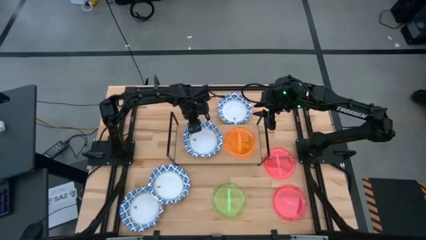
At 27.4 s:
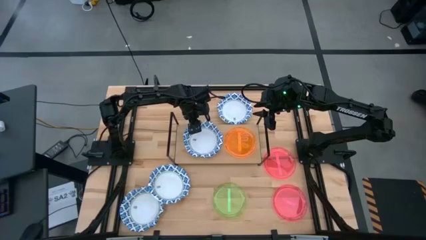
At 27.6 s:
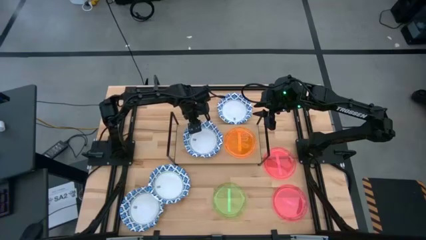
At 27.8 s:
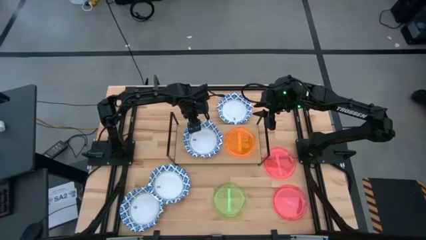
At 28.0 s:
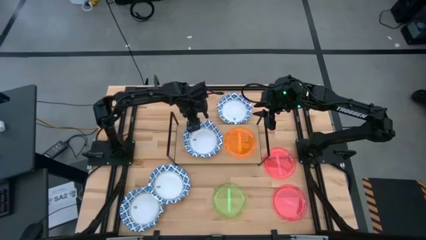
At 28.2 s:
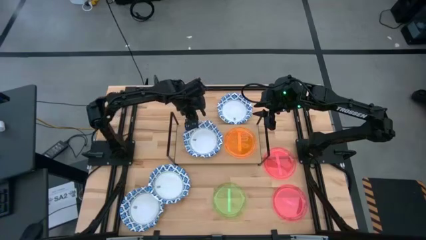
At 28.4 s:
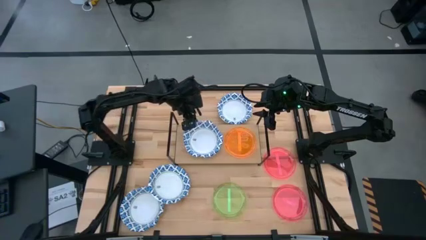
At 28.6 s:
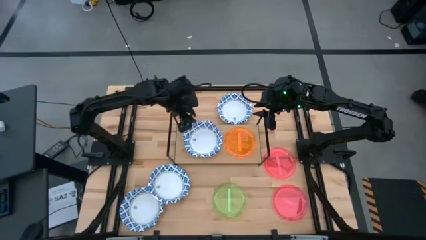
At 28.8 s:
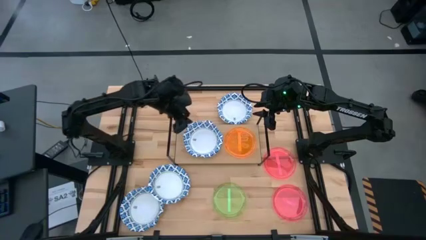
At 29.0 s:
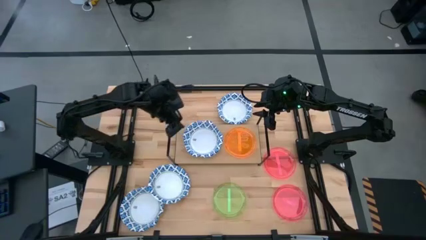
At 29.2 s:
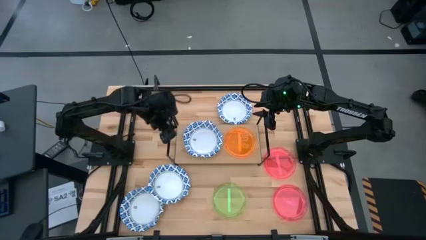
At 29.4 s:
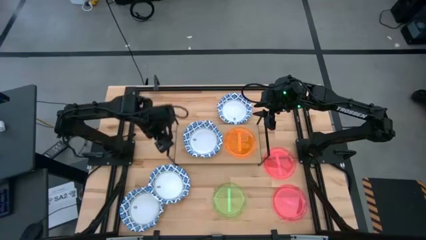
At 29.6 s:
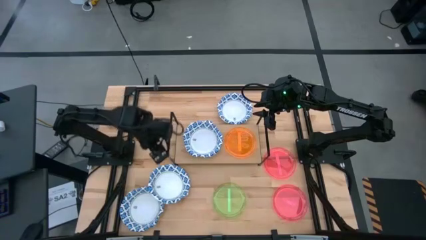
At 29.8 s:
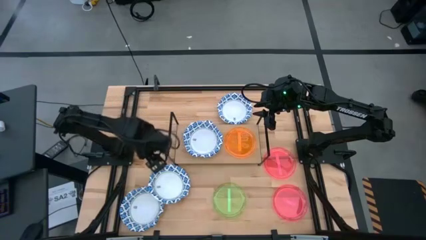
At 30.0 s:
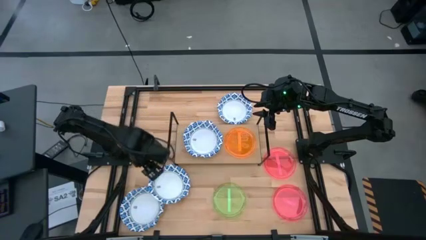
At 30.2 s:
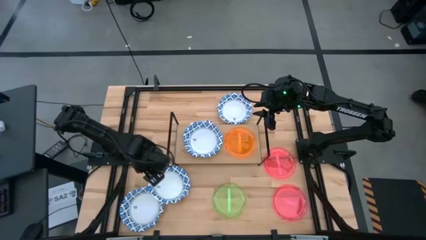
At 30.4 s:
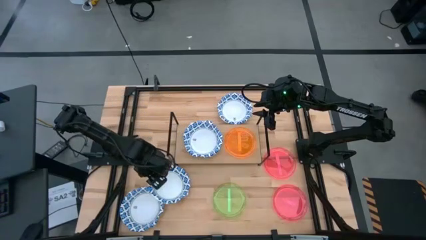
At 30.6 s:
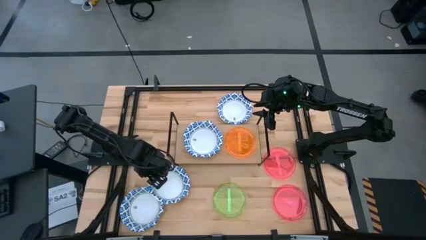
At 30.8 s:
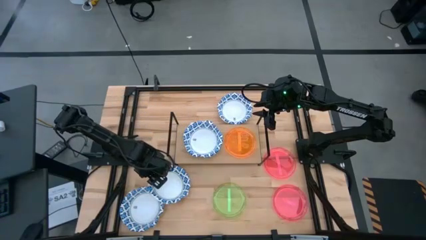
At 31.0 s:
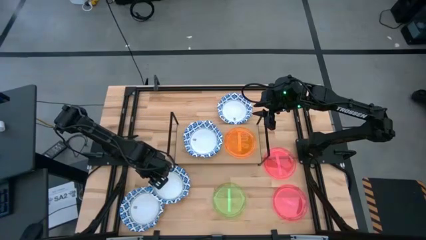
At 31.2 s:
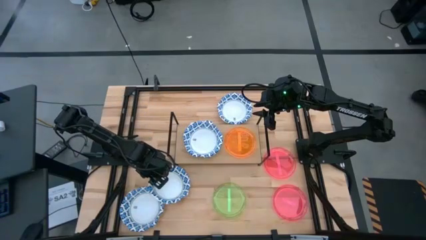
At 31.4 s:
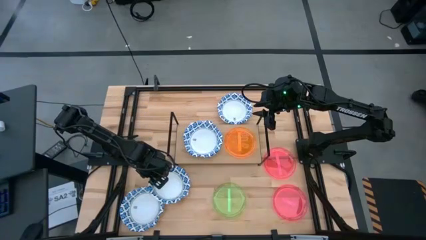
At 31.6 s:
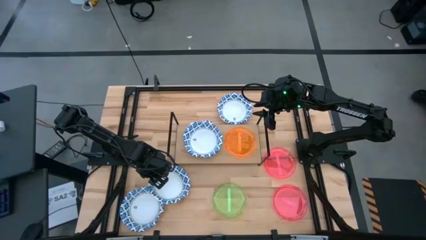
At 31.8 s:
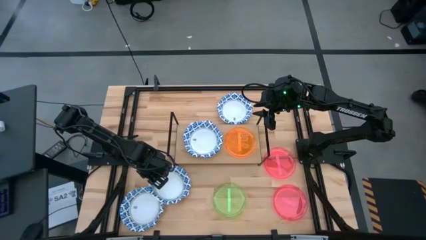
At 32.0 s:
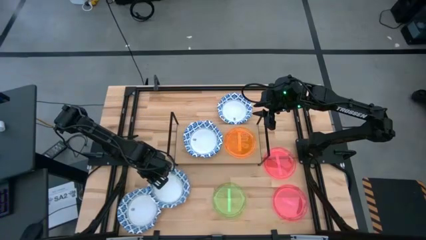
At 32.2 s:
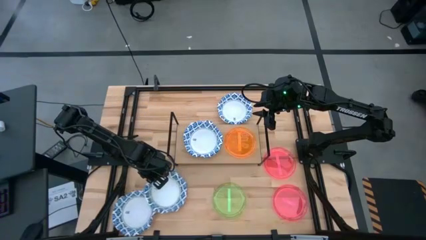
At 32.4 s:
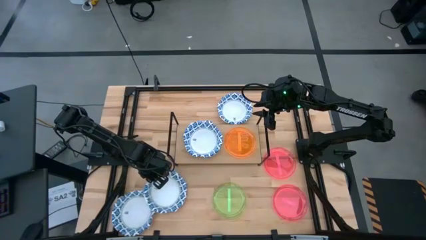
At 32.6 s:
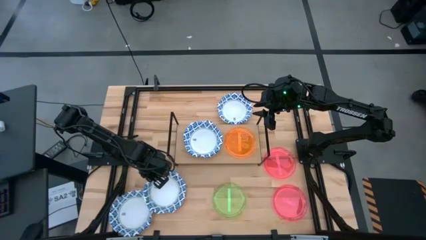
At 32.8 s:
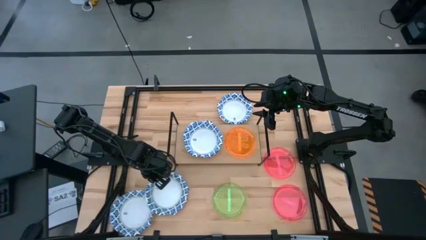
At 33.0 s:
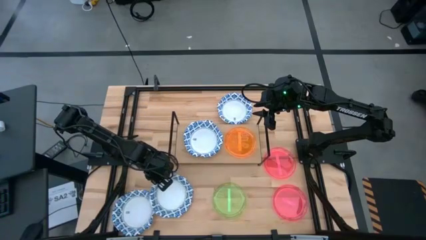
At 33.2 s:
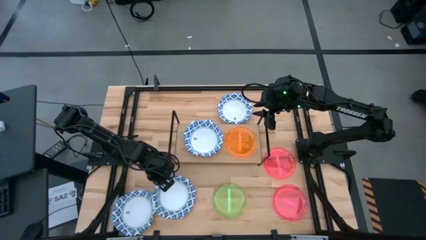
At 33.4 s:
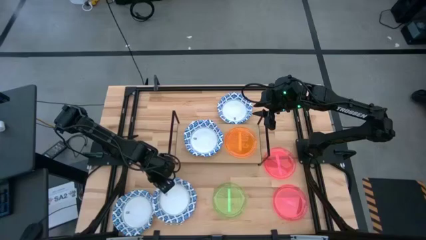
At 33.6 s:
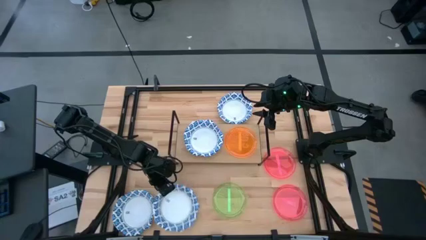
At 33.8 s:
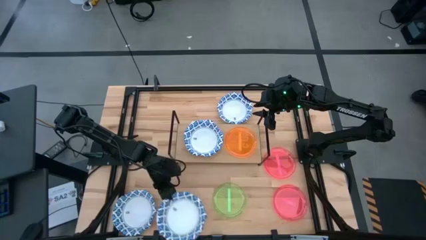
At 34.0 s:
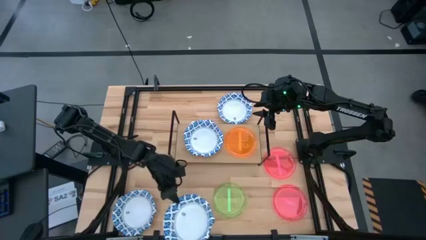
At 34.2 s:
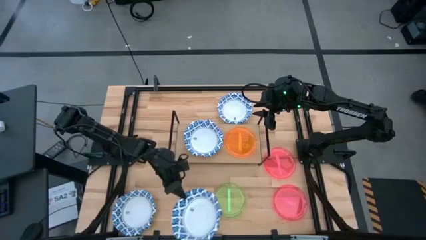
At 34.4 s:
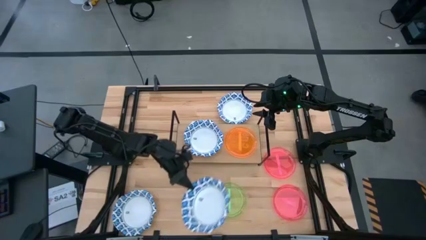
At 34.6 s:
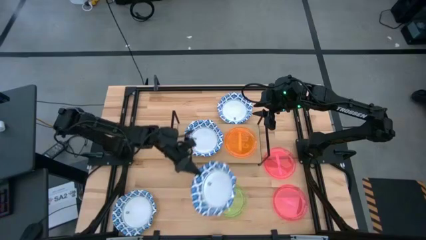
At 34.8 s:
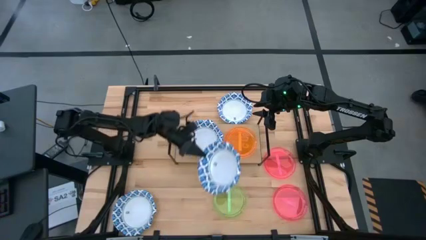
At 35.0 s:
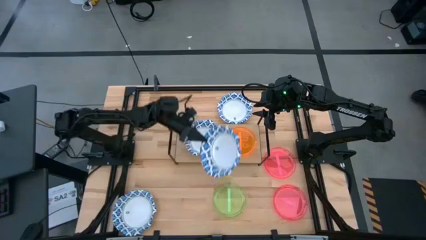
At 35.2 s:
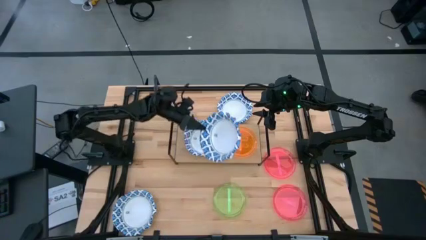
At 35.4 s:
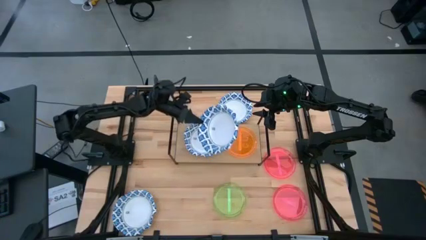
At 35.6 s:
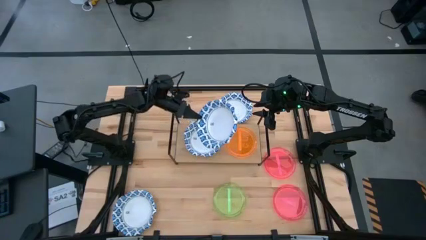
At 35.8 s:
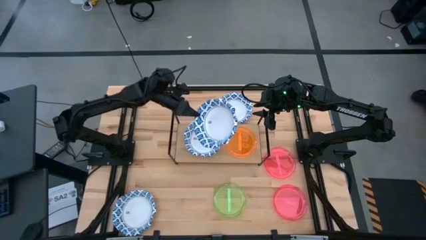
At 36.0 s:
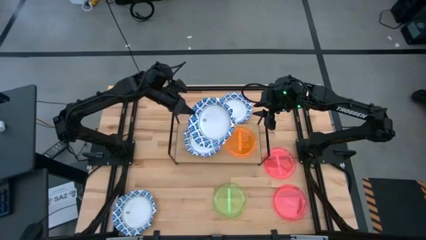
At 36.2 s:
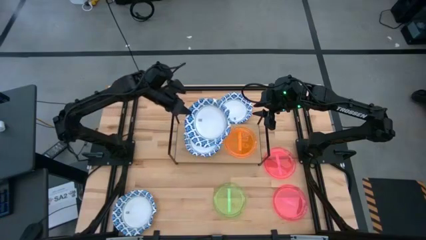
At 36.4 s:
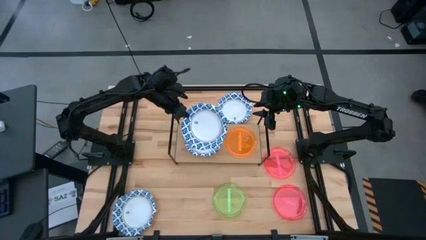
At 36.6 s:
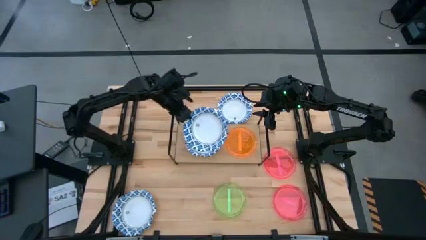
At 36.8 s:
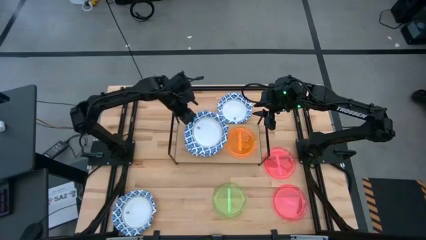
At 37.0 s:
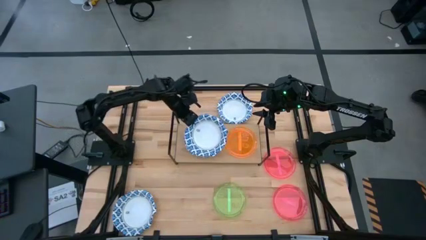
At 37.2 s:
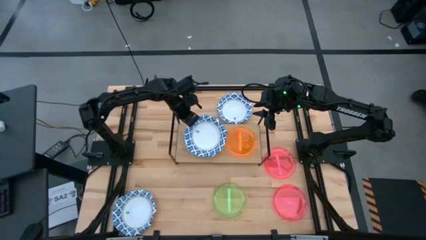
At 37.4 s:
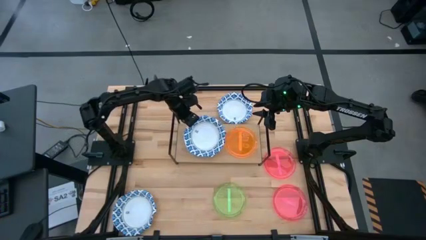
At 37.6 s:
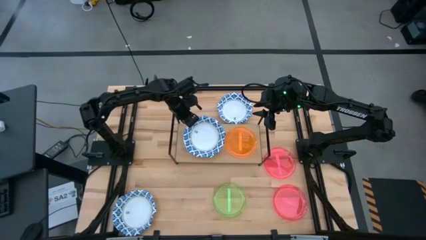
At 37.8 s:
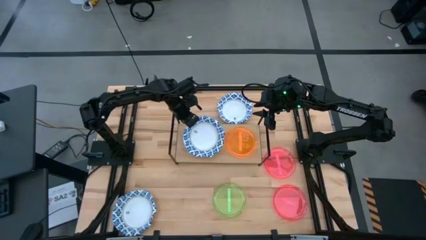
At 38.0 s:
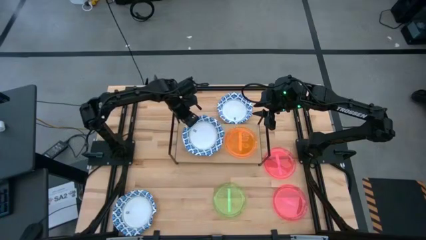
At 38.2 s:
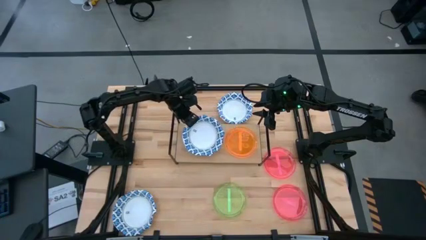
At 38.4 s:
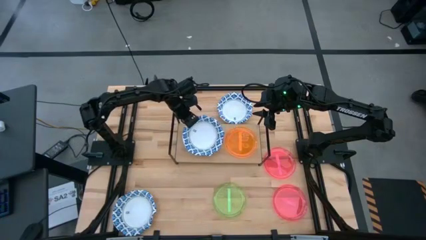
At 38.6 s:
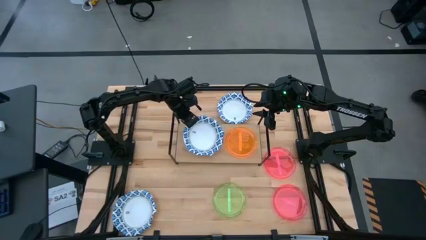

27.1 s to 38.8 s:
Task: Place and stack plates onto a shelf
Stack the blue patterned bowl on top of the blue patterned bowl on the shelf

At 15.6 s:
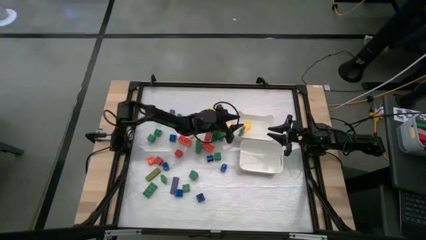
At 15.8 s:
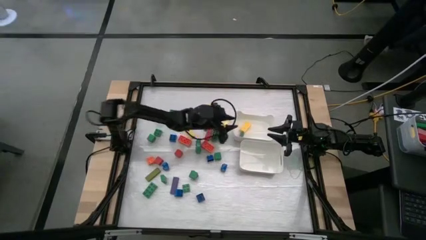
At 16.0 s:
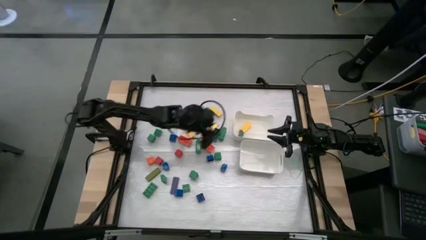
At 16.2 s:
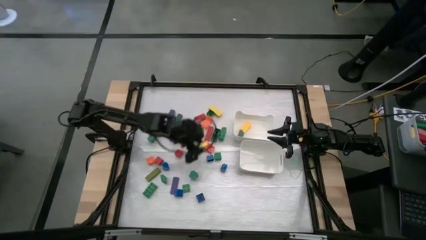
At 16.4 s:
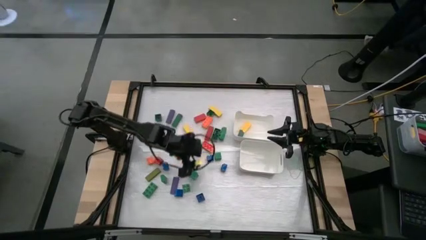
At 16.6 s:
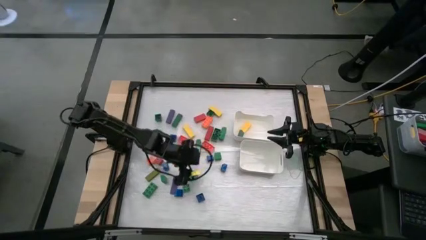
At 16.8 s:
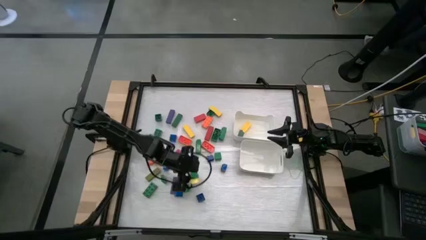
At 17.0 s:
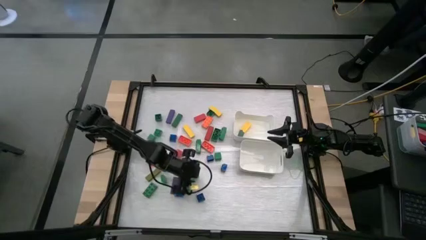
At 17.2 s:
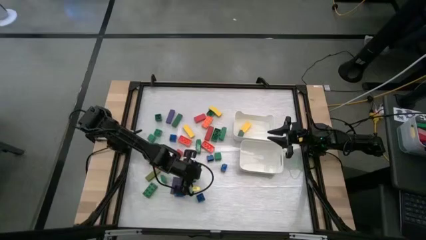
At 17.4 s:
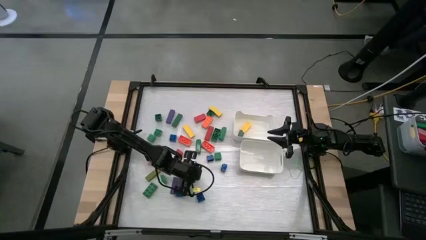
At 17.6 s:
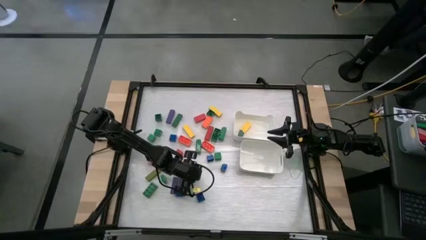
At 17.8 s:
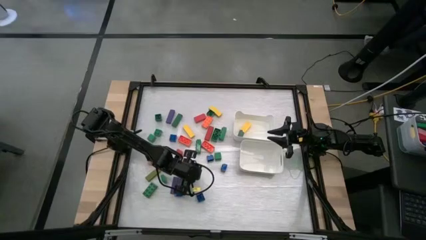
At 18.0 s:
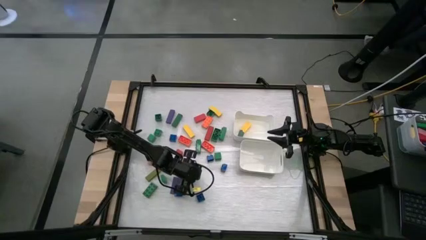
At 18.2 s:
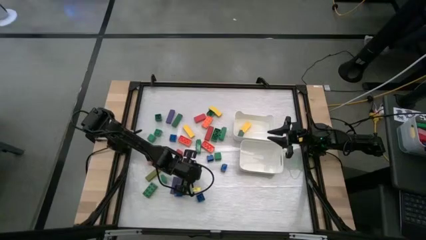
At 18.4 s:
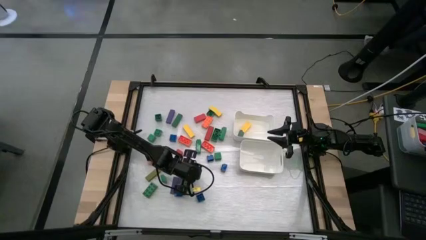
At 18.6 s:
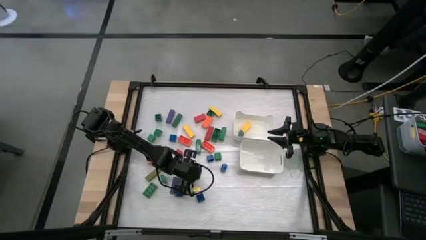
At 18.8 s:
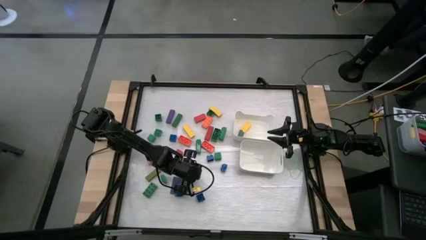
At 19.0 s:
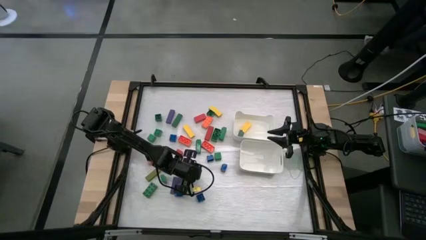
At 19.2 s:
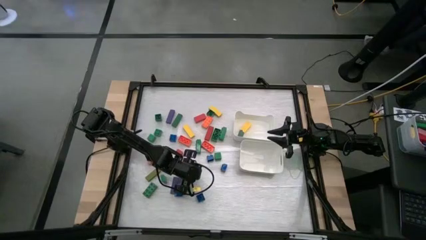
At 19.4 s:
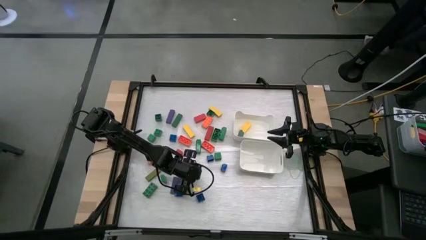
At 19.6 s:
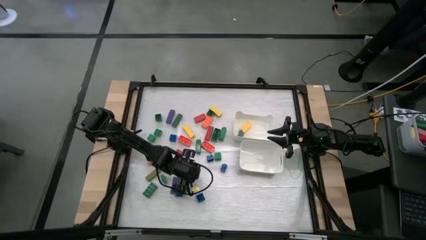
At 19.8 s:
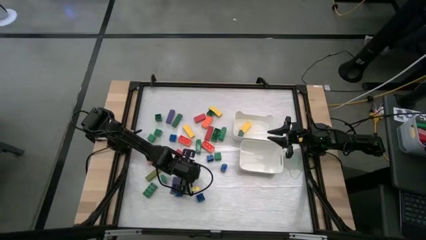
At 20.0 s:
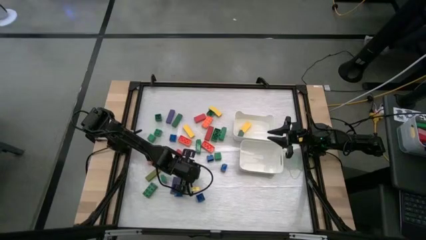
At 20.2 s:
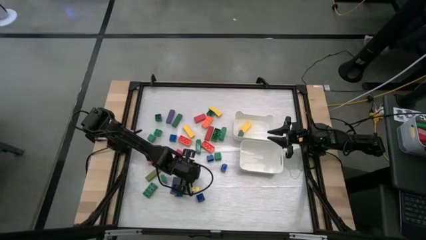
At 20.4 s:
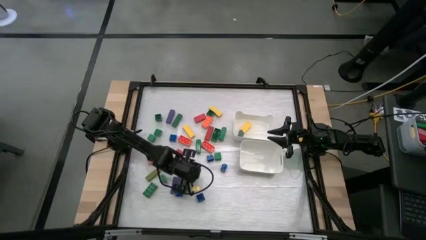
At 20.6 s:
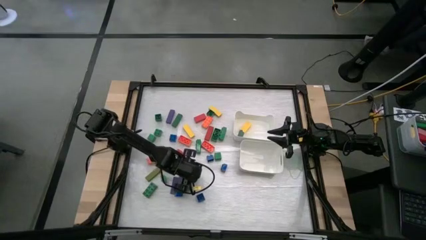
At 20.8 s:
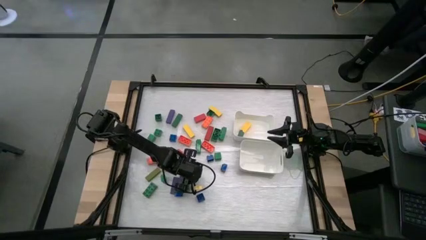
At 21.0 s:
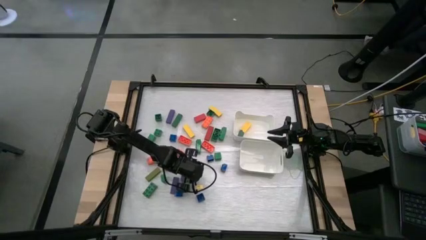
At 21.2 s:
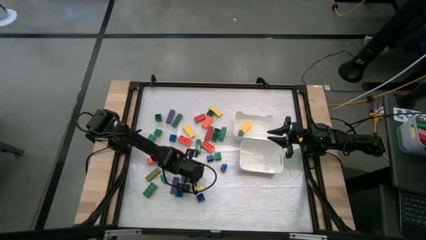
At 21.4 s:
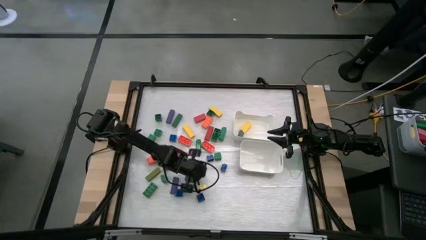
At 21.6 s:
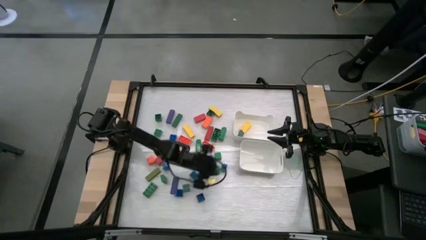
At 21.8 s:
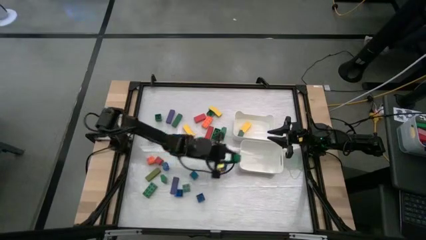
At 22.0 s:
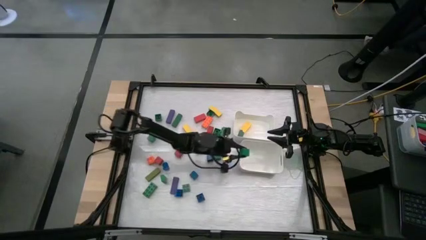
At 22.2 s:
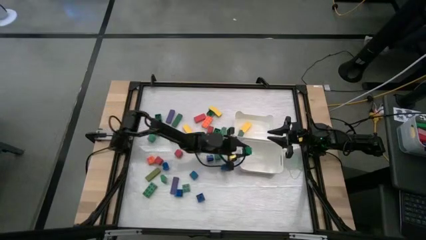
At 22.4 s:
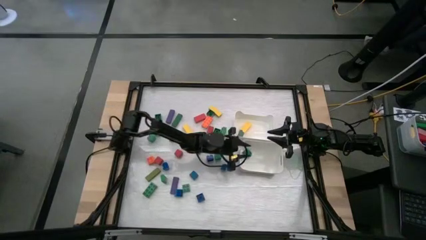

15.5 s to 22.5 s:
Task: Sort blocks by size
Put the green cube block into the bottom white bin
